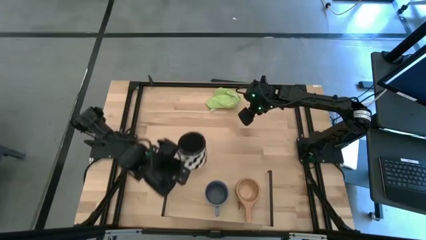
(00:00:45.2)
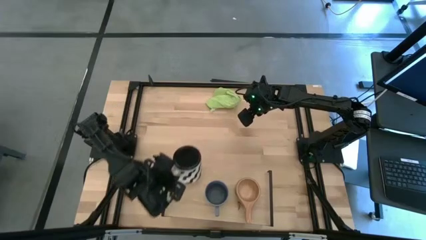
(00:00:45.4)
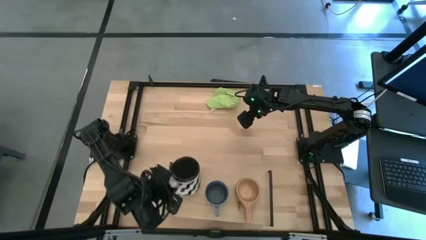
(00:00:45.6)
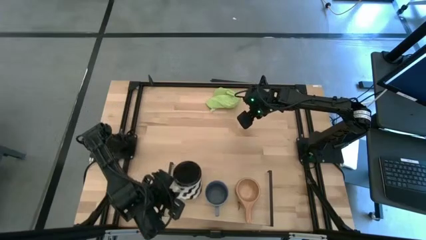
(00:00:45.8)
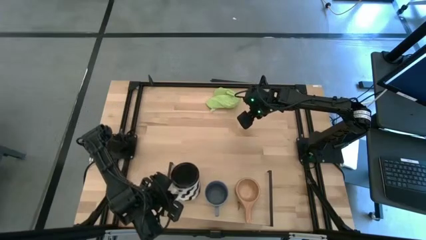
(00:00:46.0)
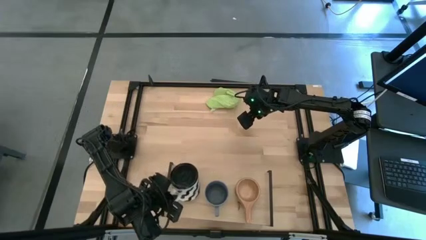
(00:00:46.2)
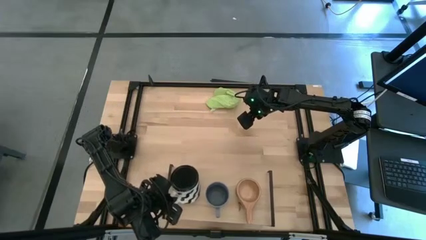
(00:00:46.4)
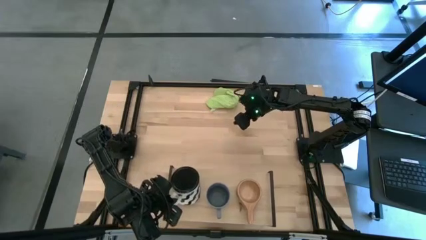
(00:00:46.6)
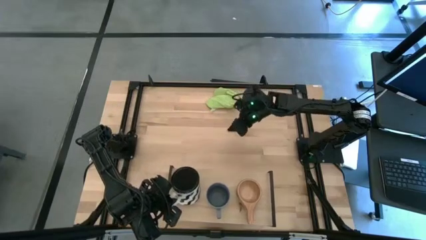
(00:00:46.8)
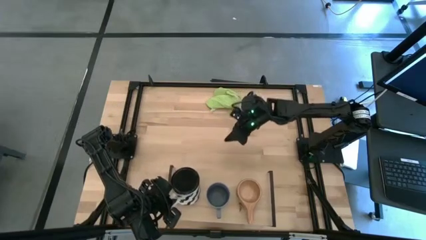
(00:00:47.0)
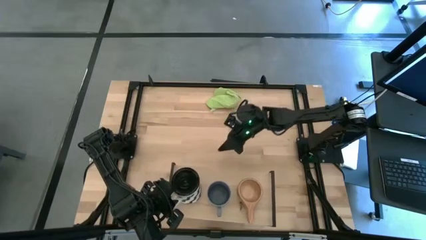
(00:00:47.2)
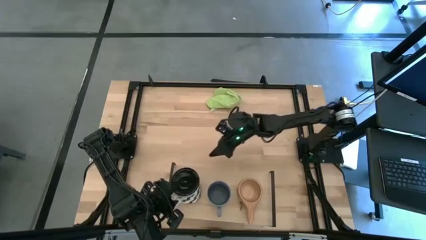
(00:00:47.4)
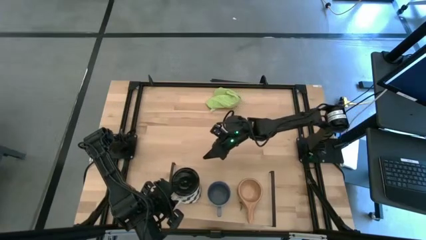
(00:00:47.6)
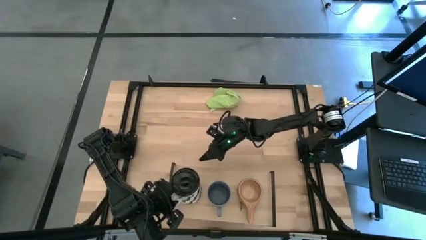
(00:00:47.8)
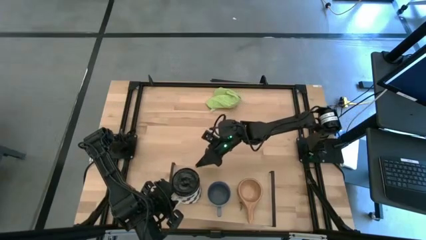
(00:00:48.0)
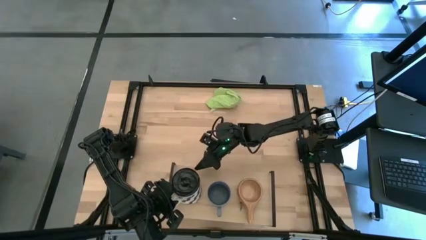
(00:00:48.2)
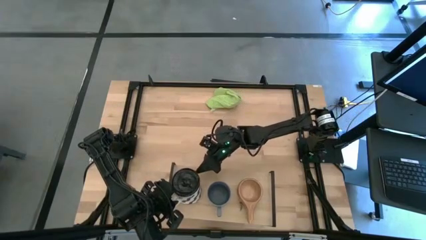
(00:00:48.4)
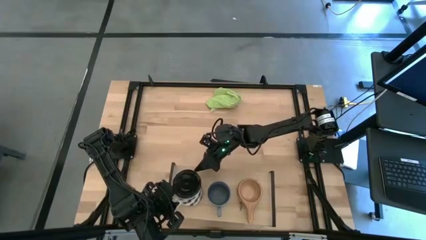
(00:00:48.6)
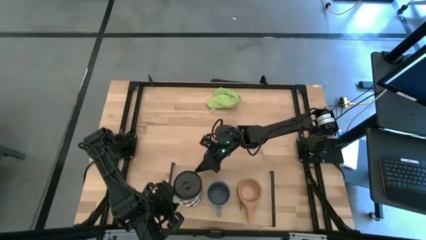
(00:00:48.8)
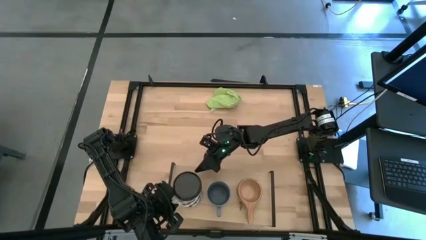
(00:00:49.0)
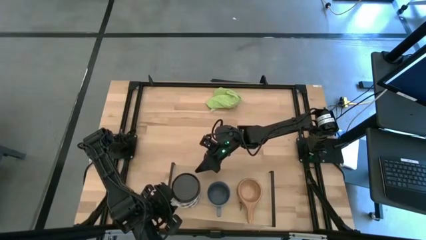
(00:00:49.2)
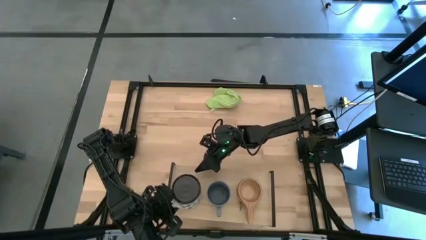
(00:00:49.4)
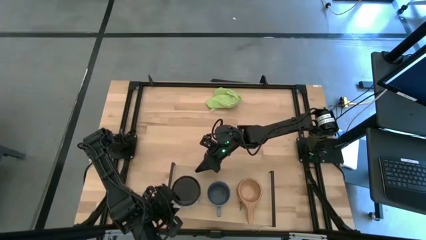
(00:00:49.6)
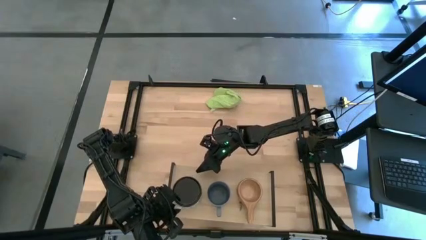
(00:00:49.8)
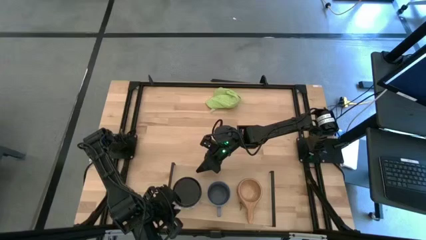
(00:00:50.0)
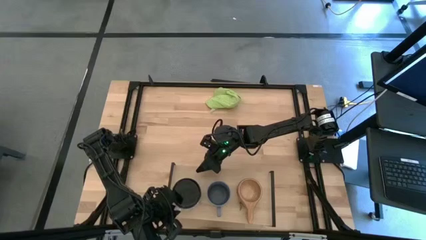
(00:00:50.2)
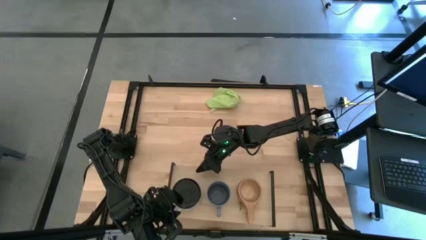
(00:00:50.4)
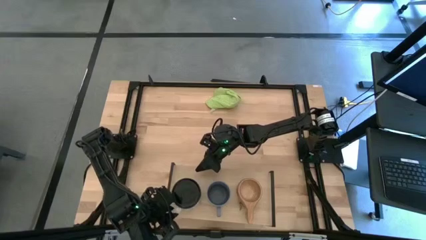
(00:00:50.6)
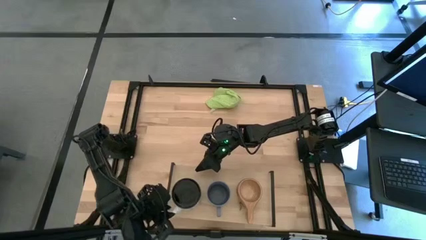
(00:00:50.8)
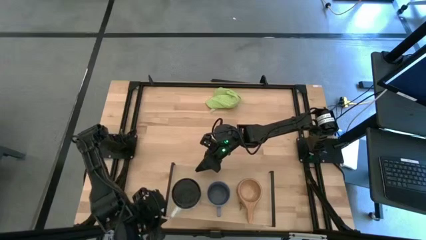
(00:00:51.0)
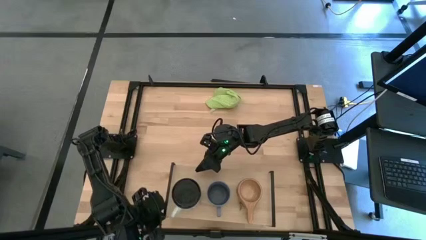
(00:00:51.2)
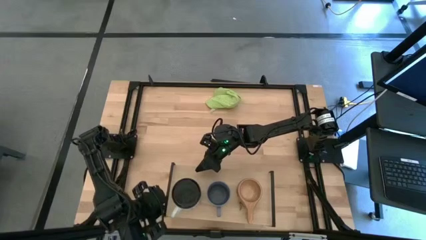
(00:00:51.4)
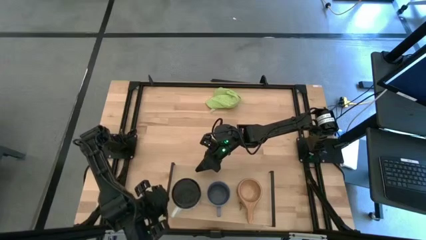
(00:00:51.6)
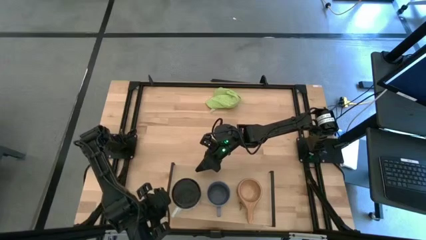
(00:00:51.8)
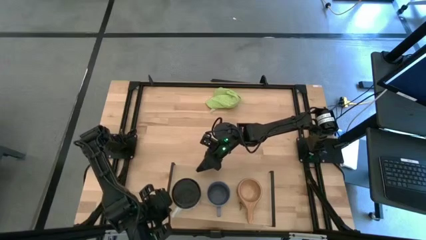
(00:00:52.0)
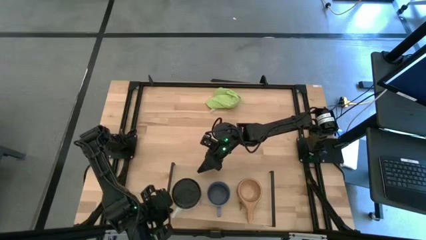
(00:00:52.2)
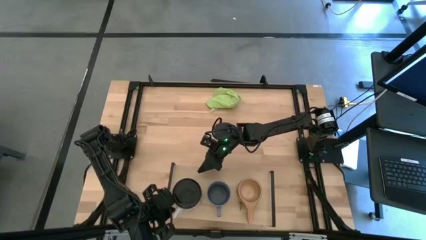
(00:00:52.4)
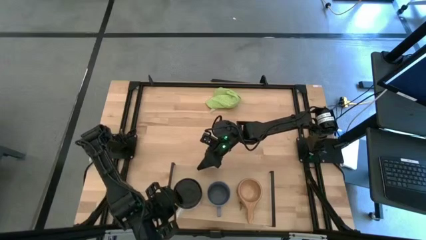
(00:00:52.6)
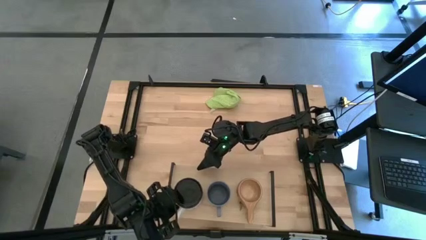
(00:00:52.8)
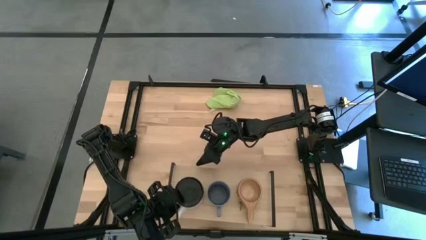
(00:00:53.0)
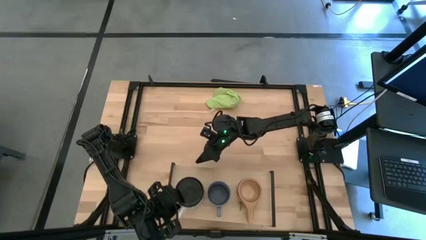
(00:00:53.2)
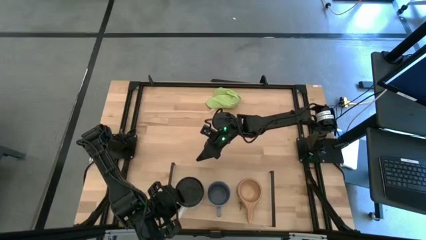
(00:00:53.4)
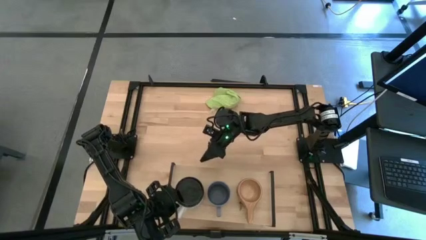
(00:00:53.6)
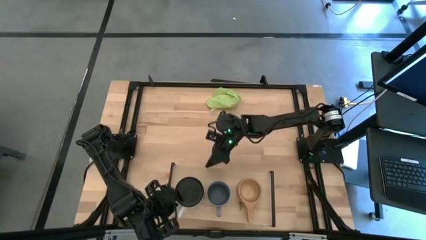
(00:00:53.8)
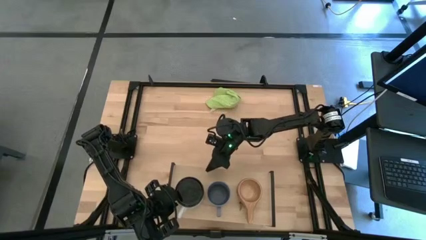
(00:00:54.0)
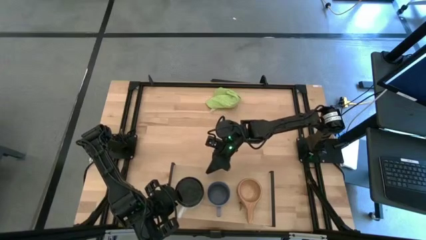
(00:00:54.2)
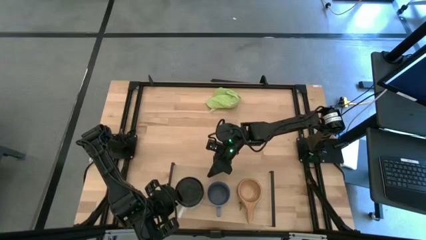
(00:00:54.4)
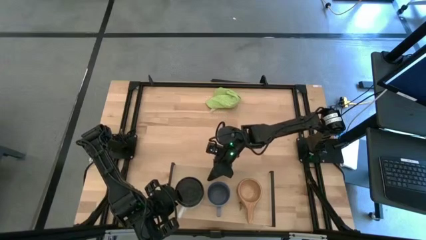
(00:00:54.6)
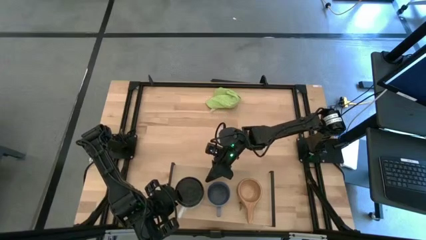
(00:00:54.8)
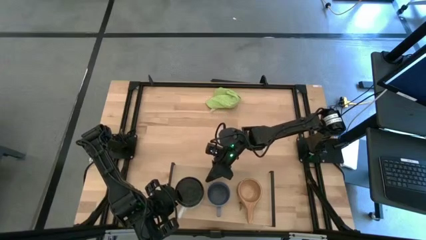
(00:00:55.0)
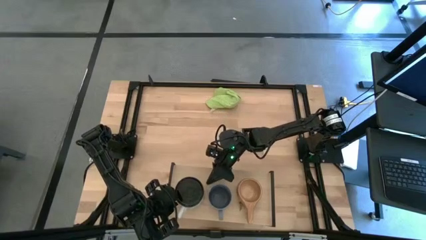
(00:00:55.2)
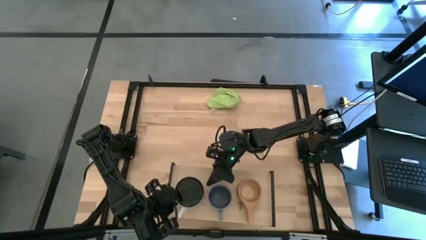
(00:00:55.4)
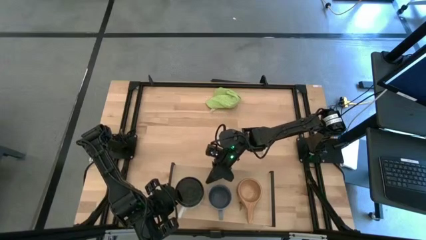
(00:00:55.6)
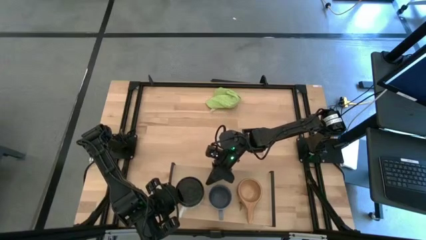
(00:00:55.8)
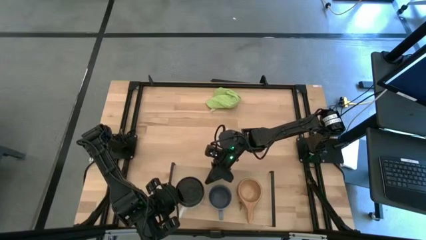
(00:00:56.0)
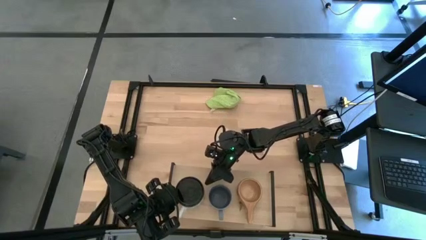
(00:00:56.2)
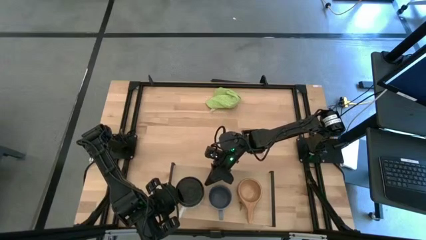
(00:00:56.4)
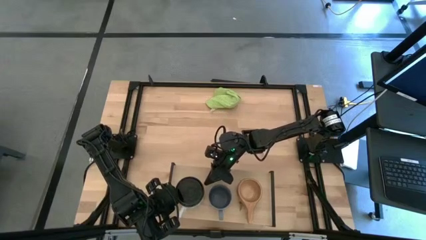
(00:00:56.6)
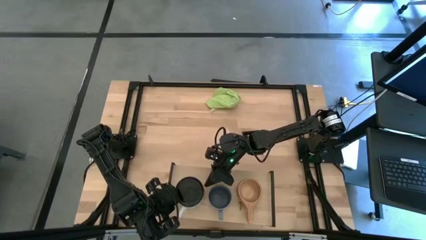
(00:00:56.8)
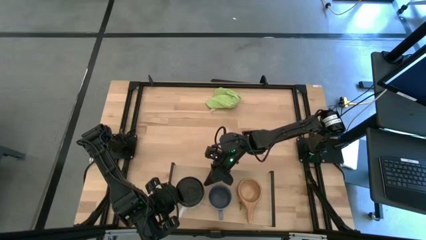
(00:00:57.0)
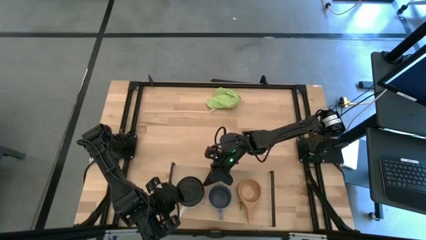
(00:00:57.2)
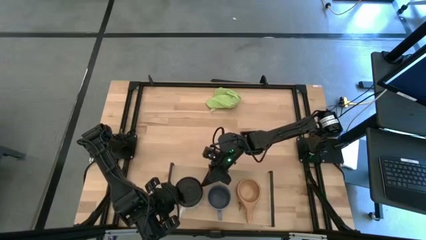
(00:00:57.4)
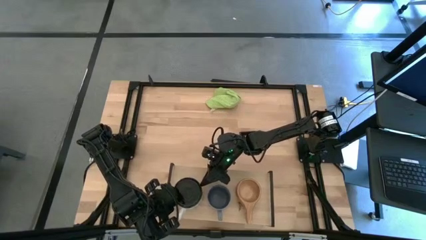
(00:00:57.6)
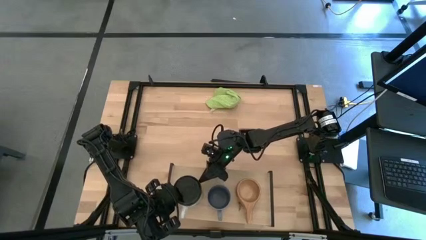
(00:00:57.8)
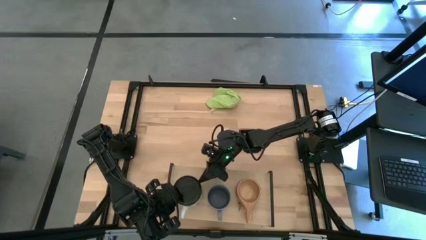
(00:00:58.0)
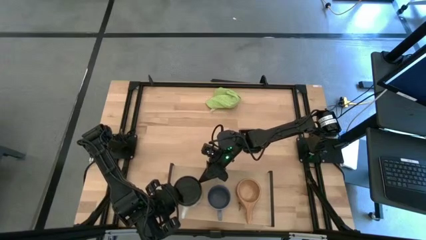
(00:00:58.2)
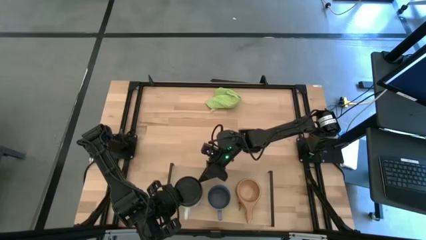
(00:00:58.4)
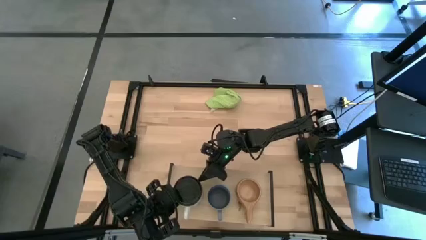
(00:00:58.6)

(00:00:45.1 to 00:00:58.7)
Task: Stack small to large cups/mugs on shelf
Put the white mug on the shelf
